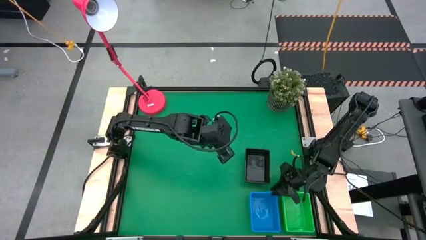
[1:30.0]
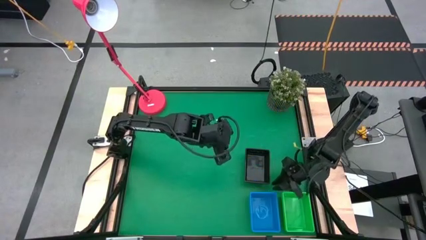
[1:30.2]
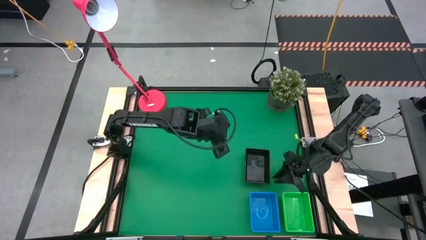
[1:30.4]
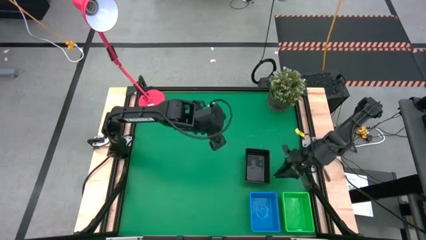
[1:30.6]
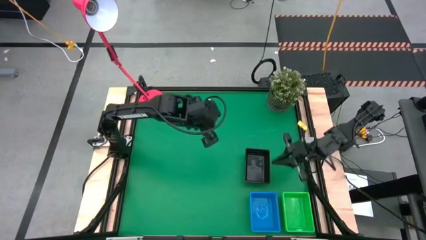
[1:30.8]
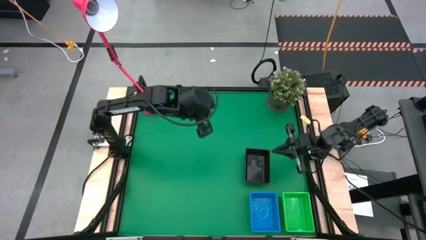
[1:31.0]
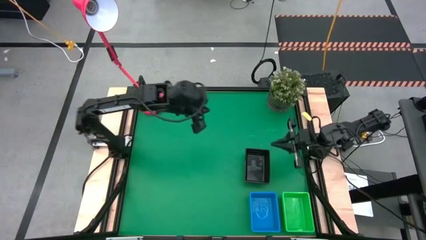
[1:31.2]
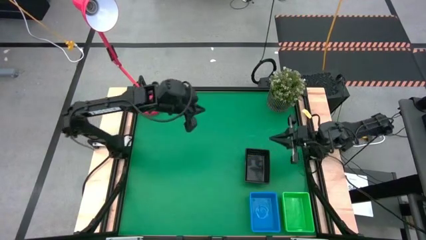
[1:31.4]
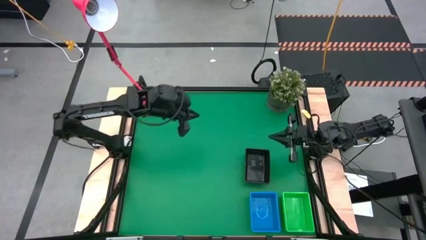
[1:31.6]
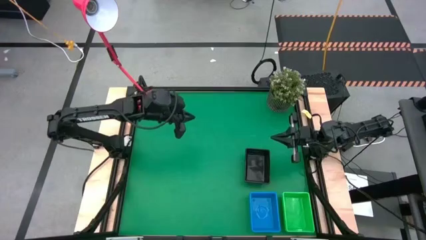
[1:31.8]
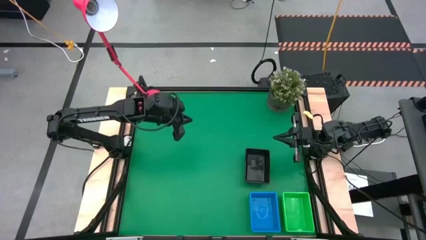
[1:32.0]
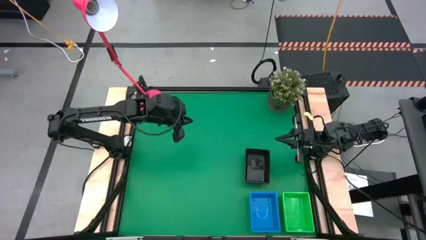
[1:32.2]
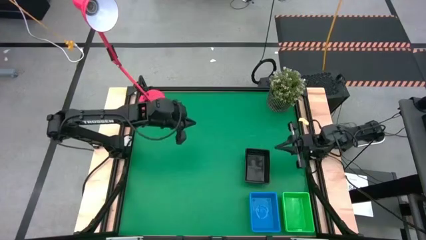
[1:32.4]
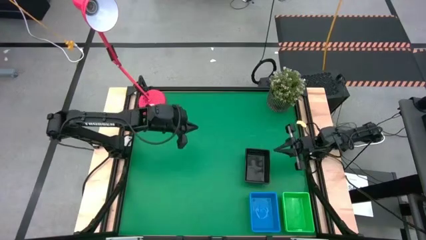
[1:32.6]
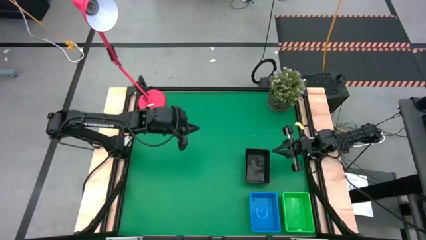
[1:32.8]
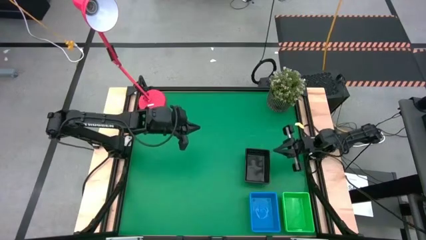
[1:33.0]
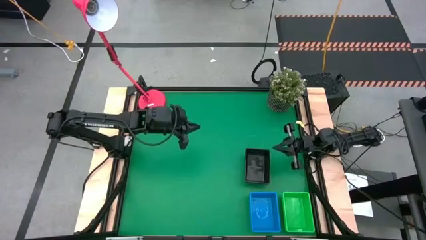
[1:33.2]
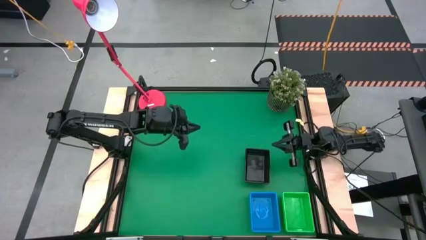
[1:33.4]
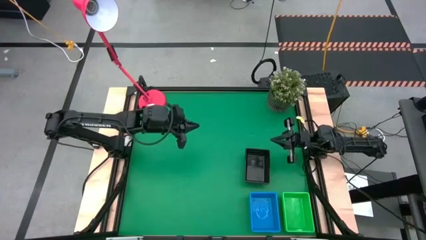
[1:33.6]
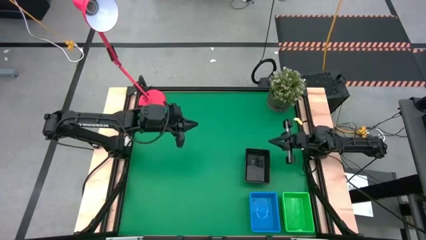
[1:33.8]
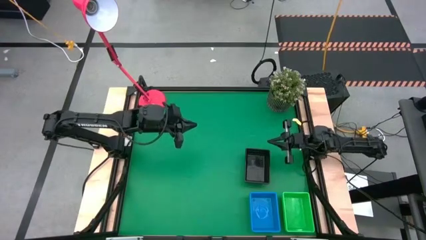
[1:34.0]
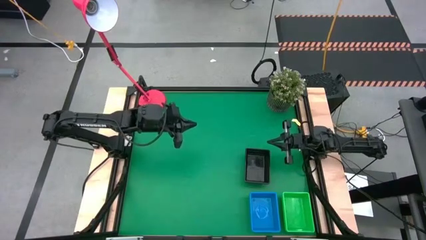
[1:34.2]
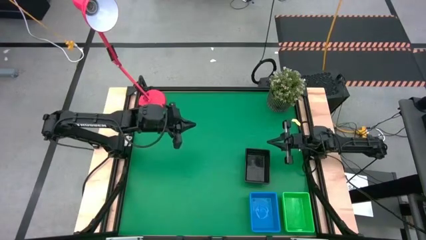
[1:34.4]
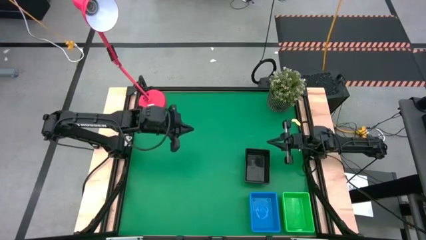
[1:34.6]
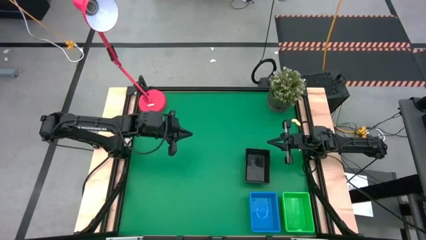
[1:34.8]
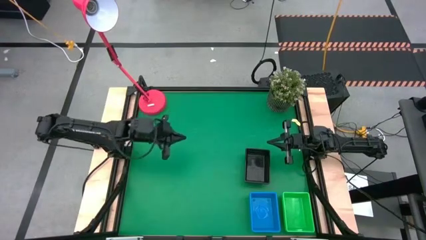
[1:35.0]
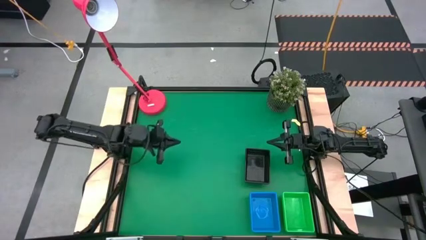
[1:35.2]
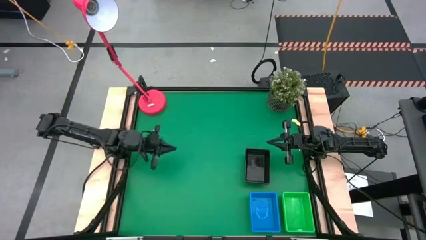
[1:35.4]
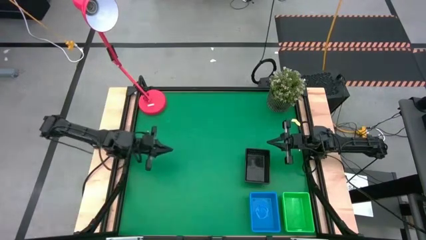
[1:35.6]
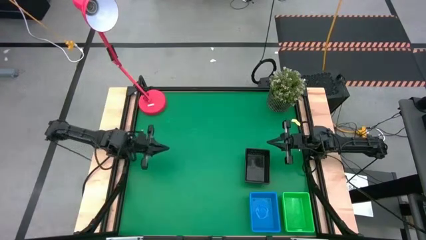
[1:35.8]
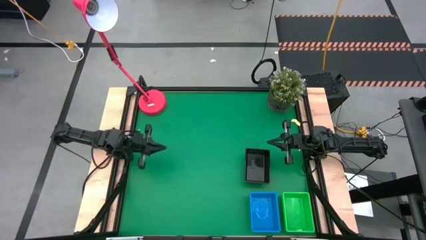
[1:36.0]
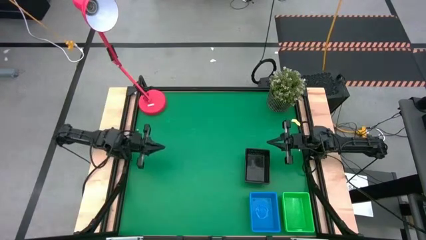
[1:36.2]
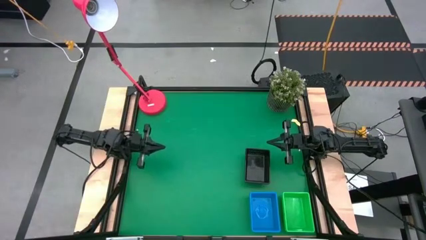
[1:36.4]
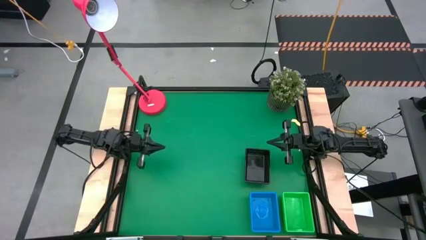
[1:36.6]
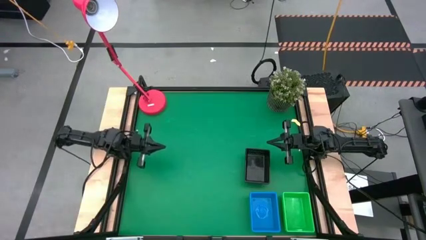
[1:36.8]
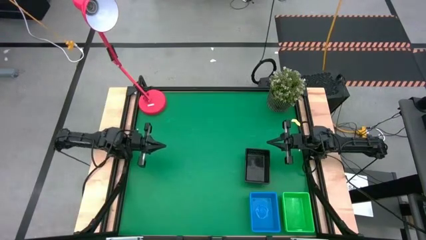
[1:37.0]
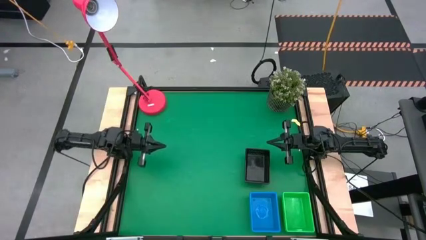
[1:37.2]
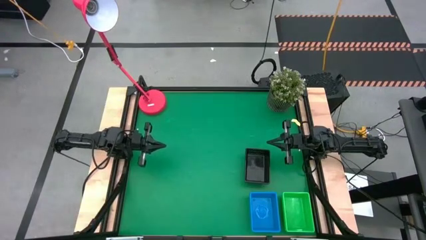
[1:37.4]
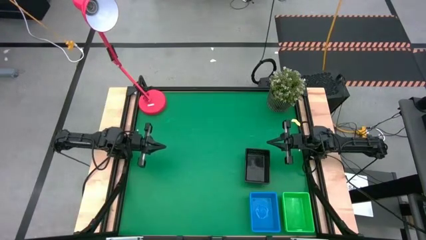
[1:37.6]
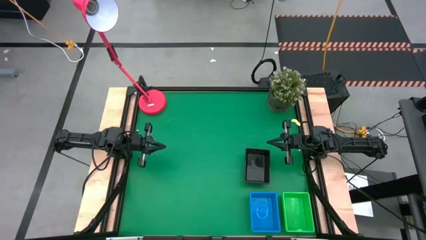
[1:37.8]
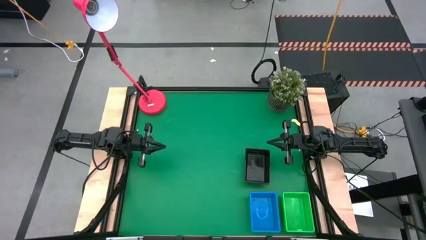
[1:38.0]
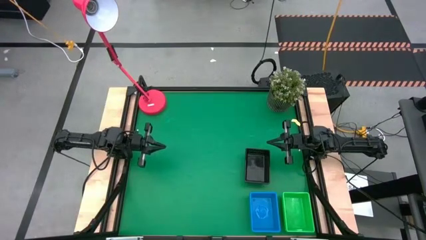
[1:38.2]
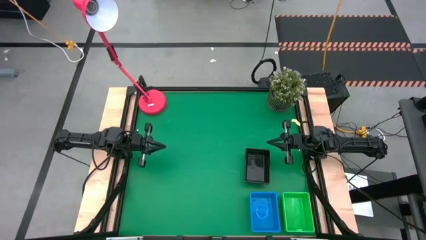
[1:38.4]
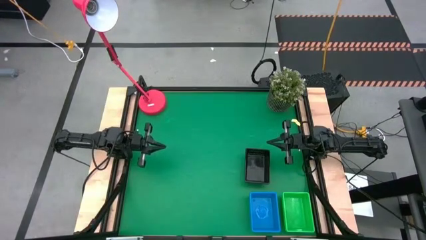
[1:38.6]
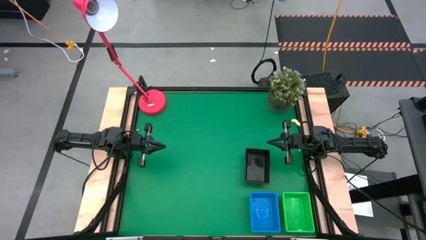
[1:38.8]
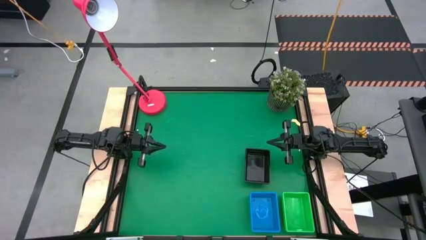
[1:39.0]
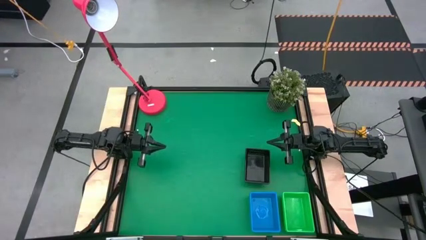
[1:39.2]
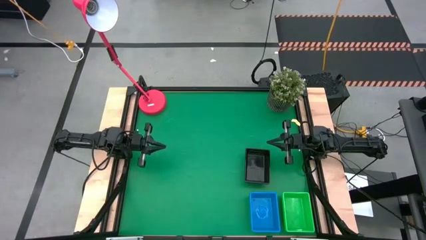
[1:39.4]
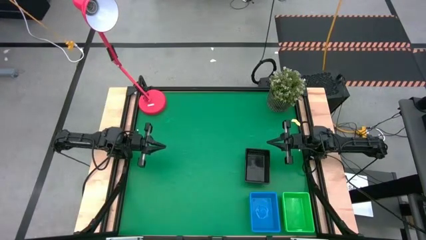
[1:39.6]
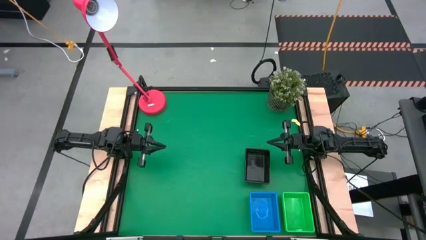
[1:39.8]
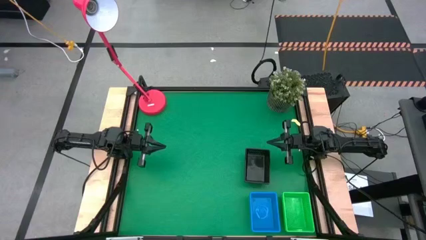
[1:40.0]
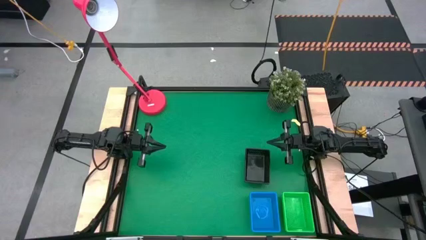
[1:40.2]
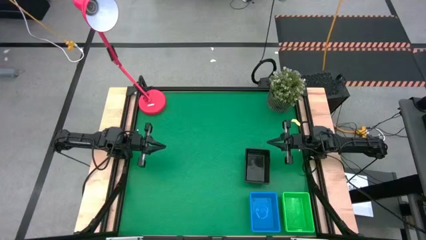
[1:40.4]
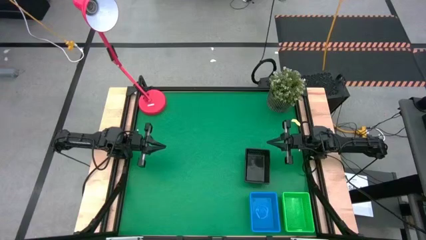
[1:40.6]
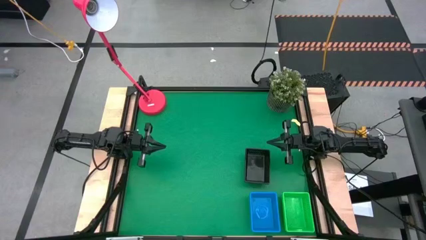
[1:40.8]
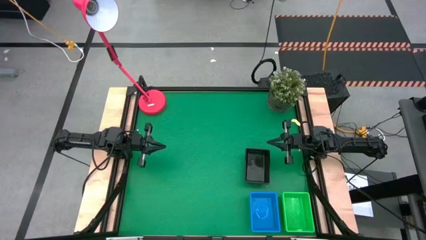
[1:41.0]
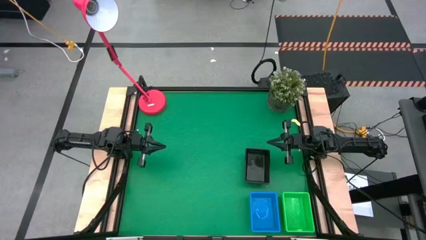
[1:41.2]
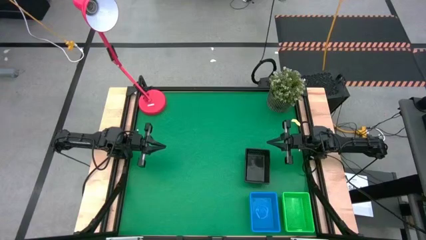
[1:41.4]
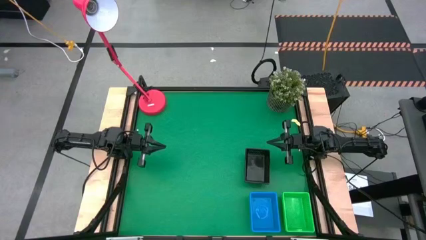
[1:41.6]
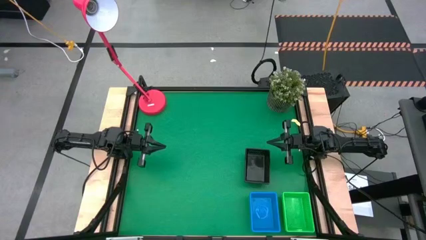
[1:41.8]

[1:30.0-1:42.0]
Return to Home Position
